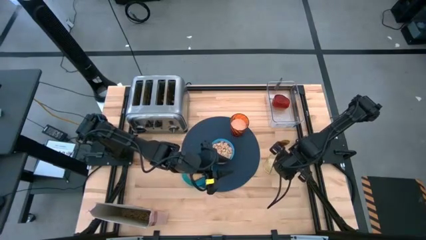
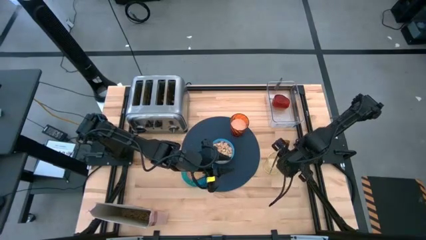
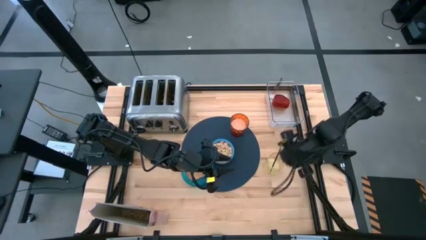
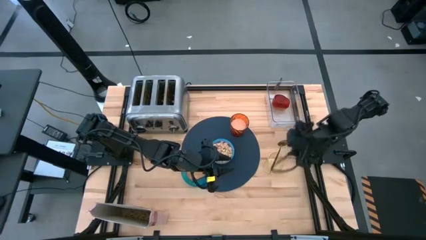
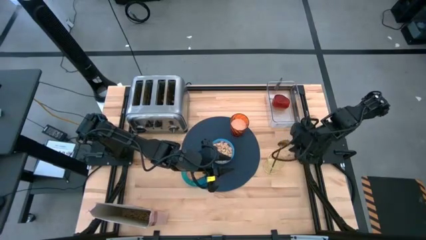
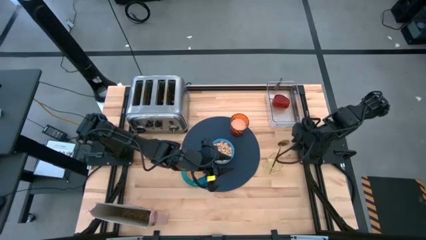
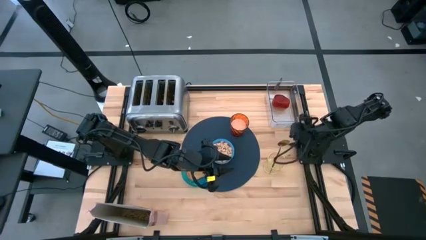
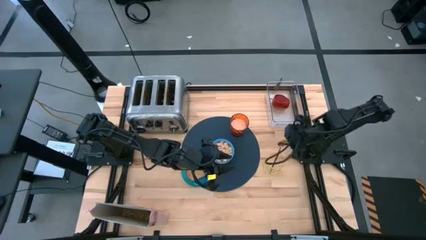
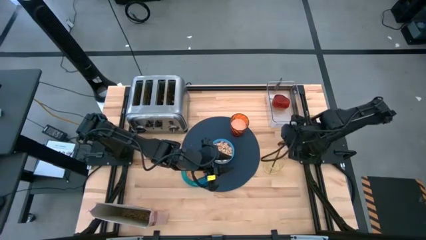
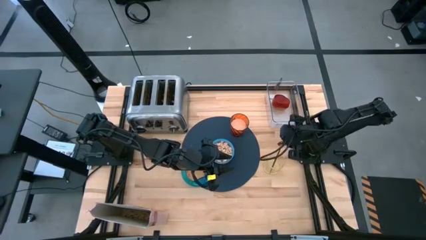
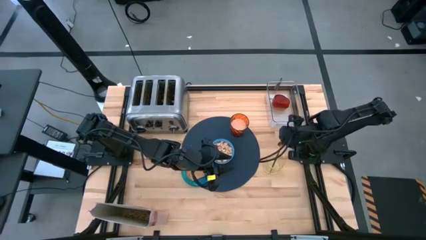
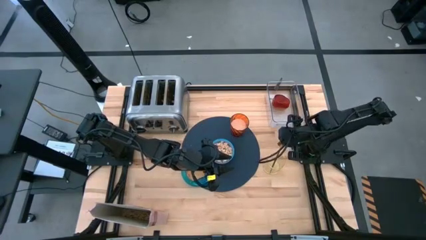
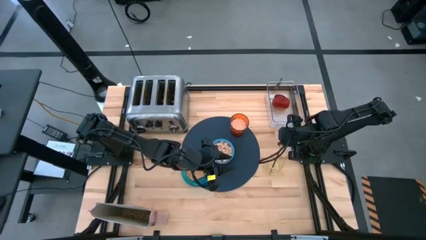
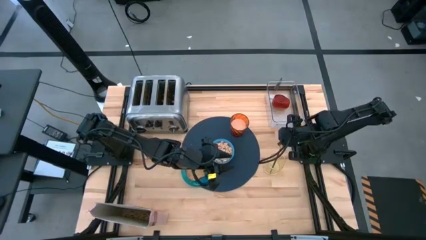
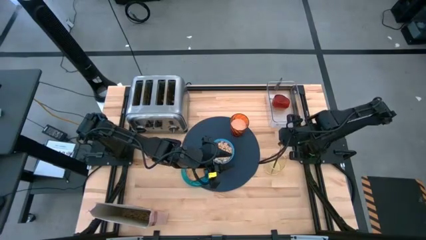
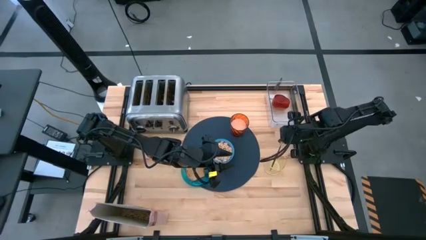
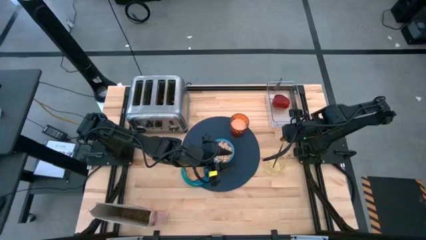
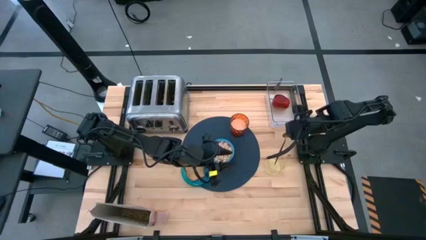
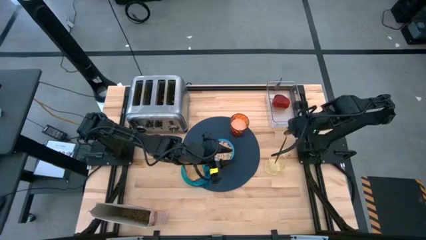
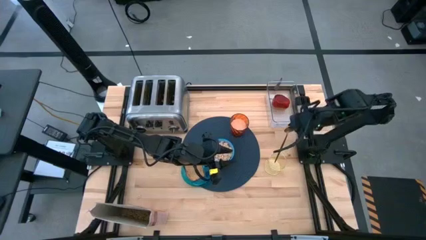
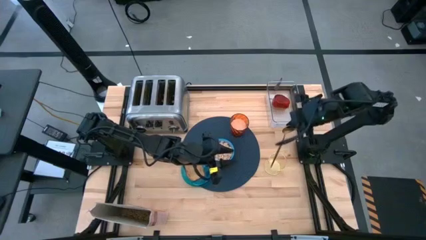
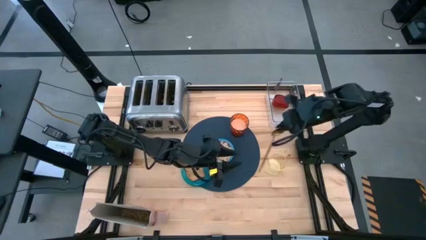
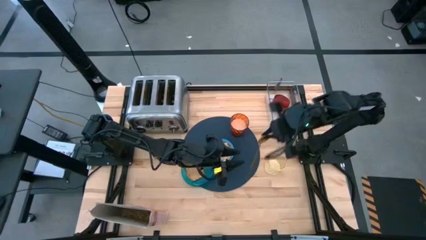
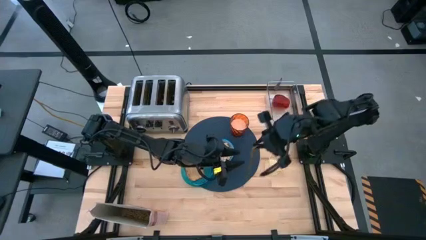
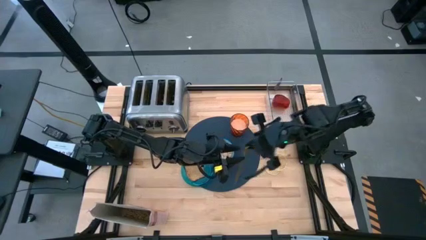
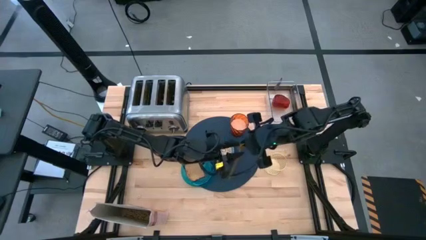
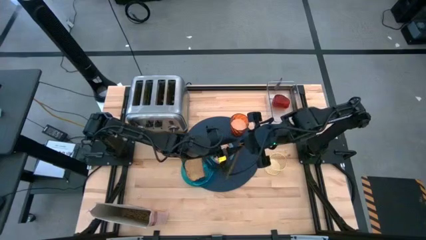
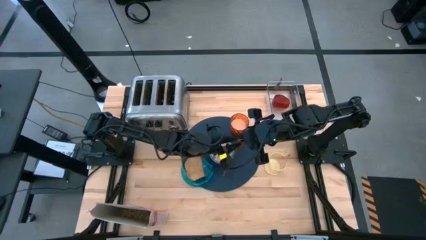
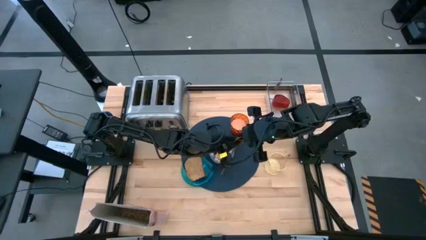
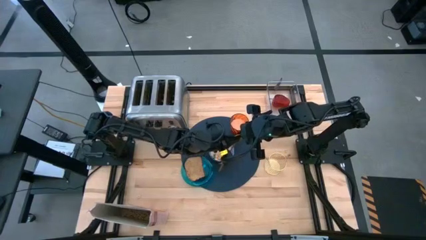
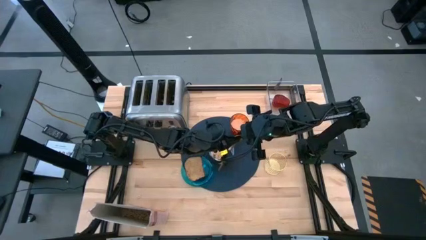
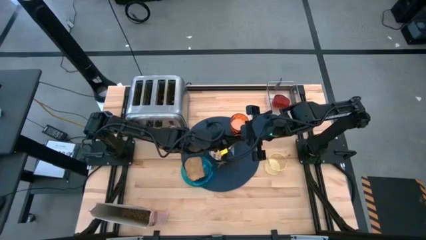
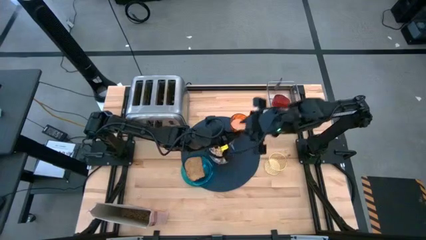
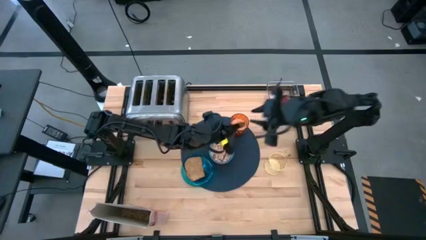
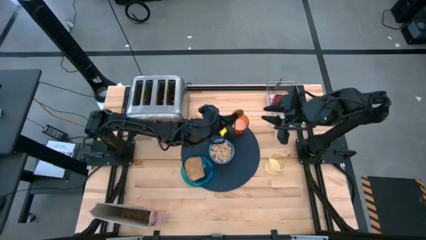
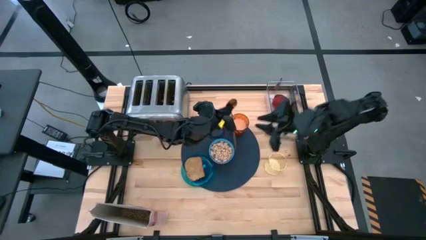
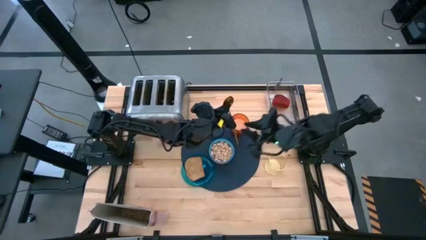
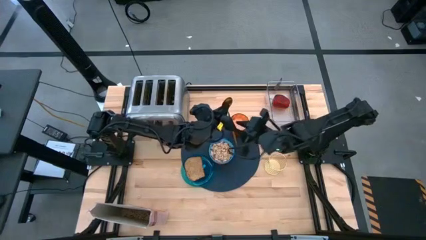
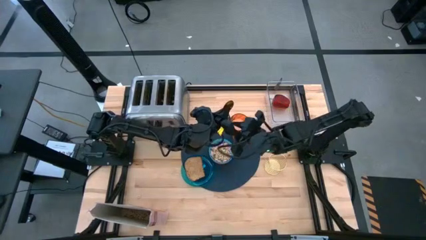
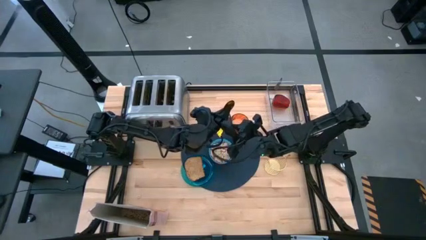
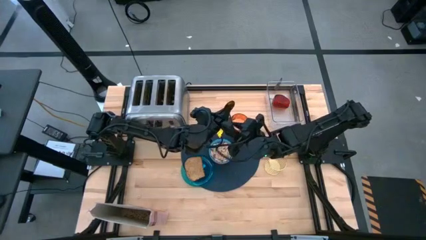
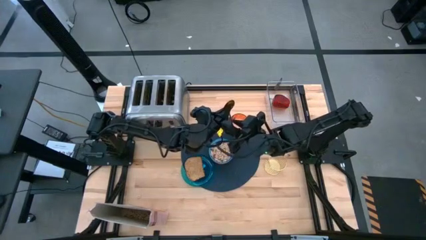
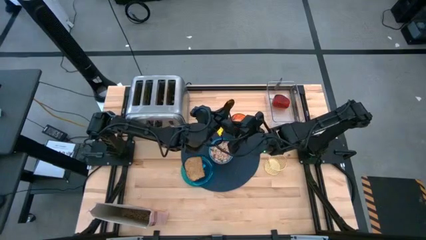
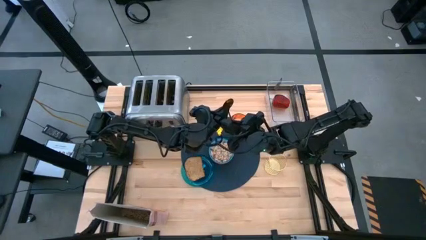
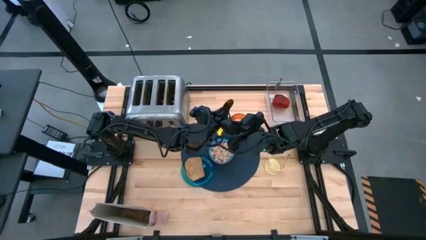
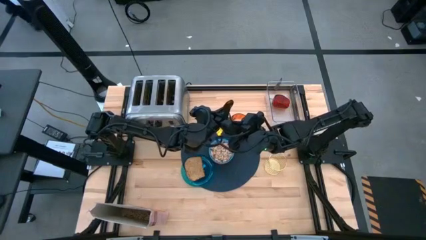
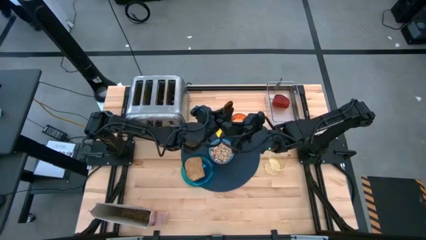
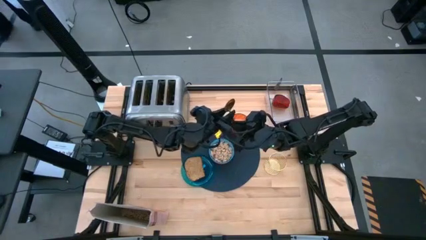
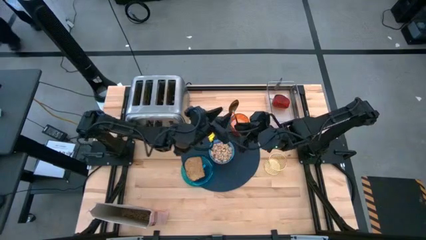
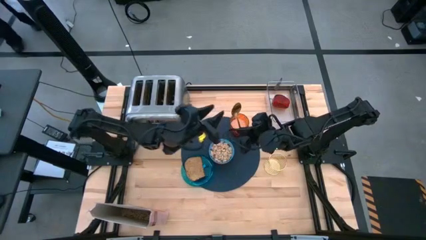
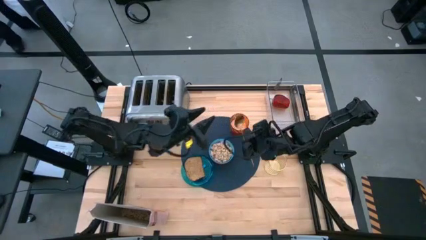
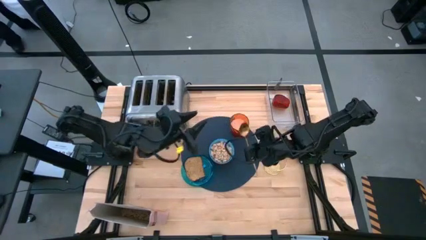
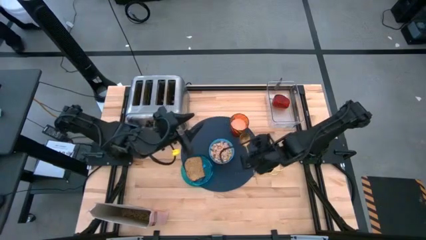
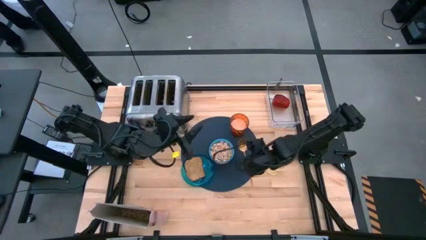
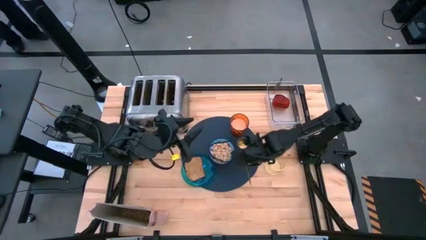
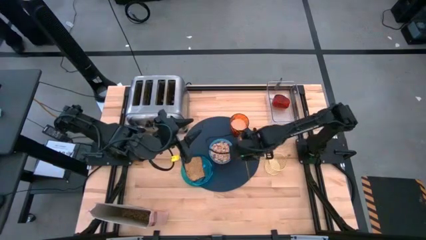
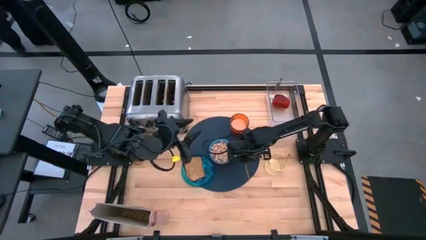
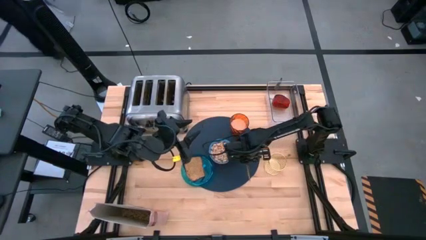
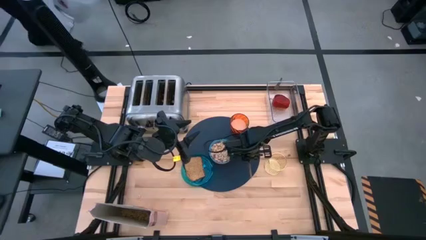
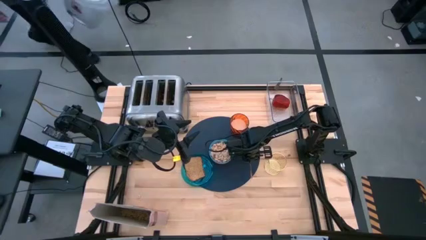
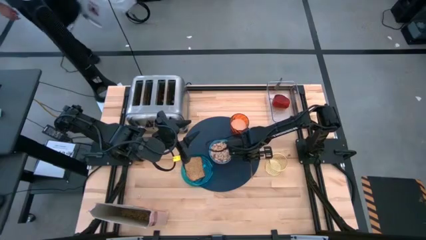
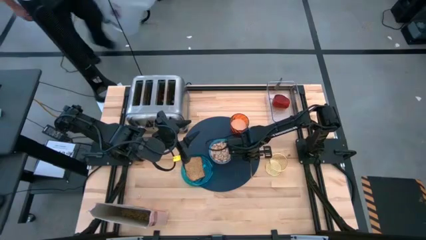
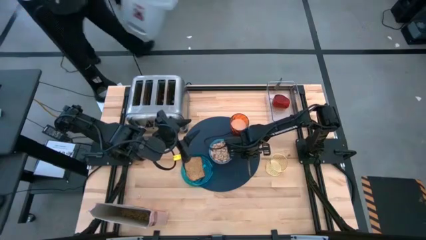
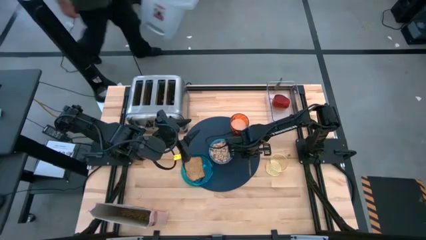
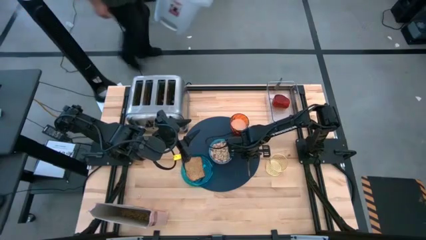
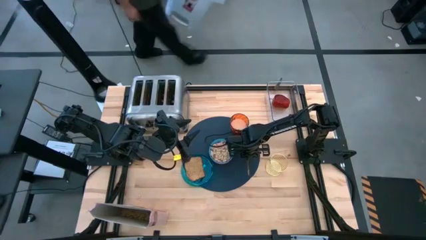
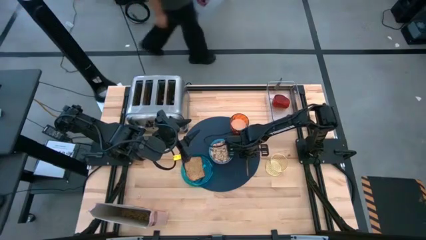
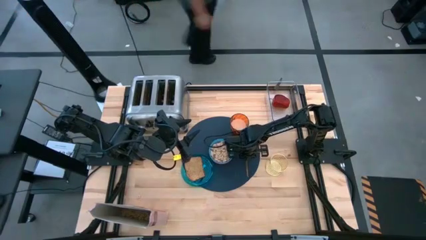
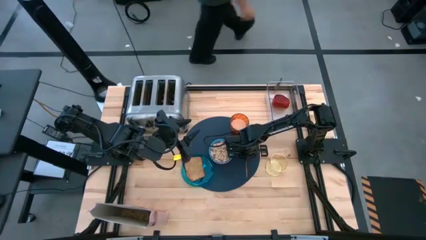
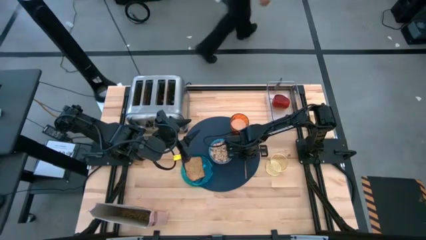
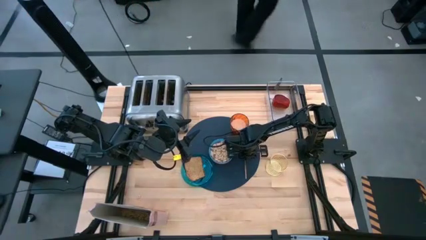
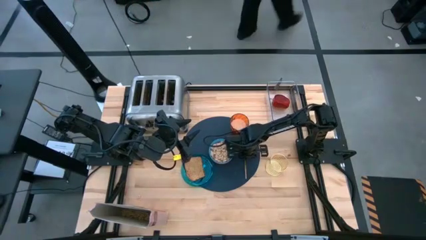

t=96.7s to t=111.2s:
Task: Arrange a breakfast setting
Put the gold spoon on the blue table mat to the right of the blue bowl
